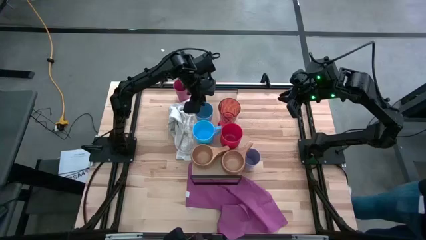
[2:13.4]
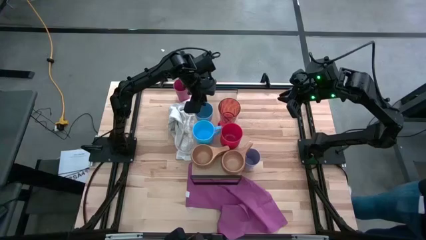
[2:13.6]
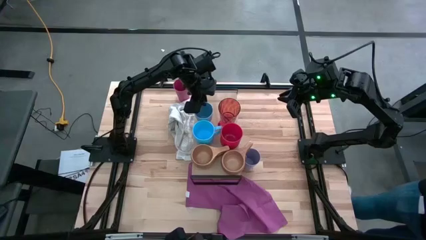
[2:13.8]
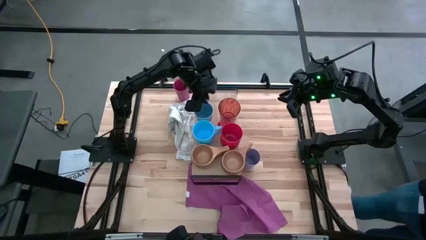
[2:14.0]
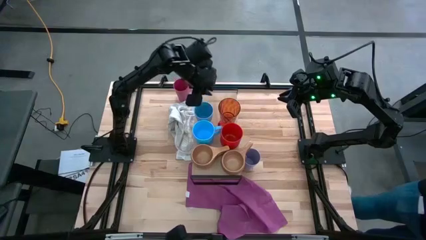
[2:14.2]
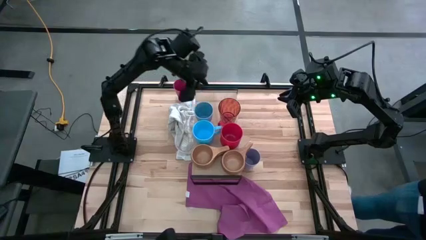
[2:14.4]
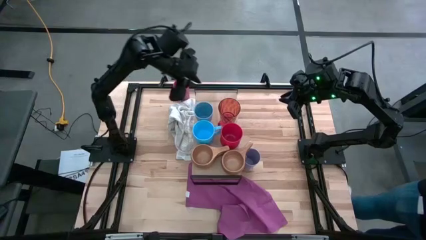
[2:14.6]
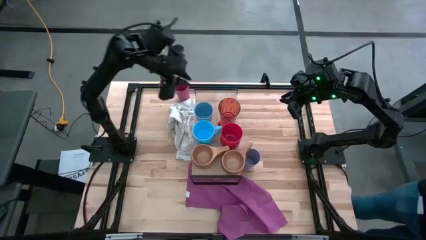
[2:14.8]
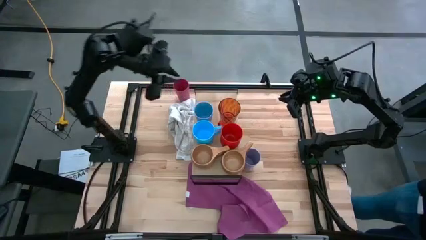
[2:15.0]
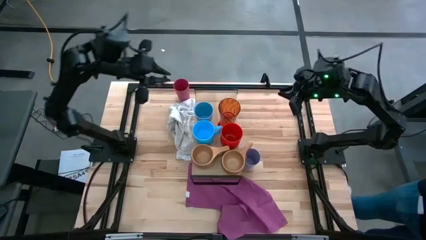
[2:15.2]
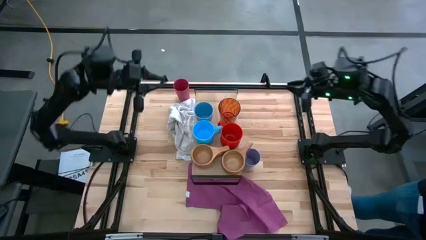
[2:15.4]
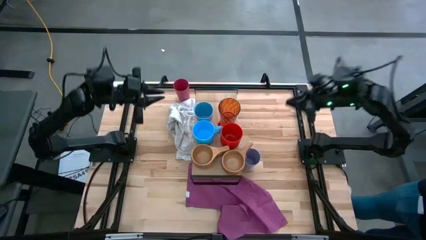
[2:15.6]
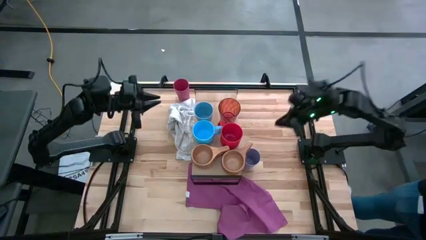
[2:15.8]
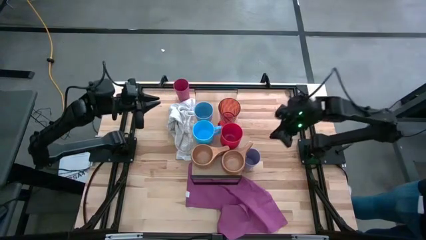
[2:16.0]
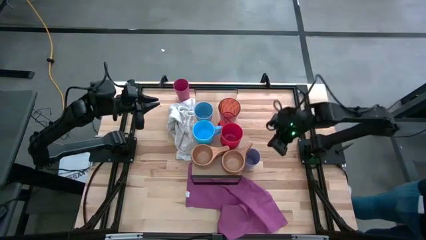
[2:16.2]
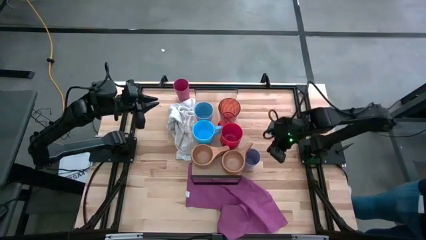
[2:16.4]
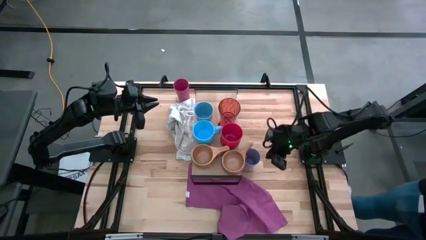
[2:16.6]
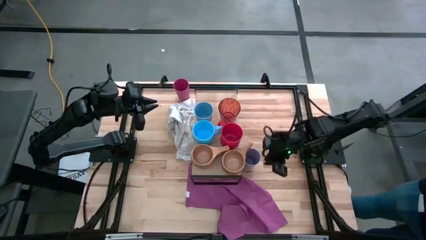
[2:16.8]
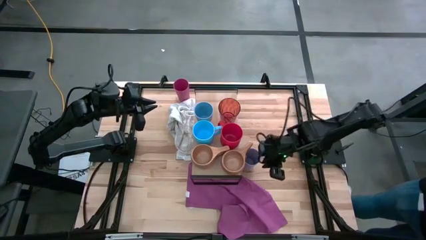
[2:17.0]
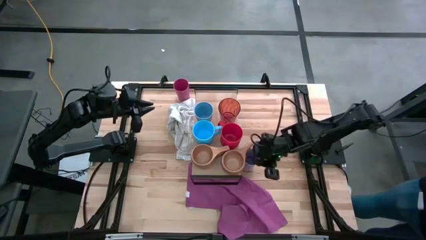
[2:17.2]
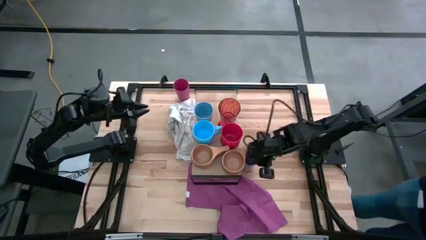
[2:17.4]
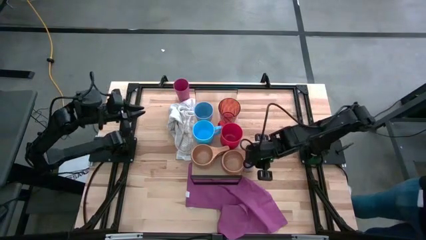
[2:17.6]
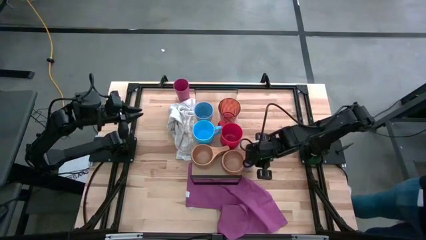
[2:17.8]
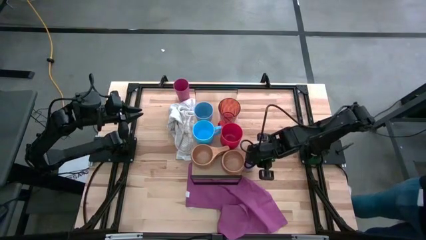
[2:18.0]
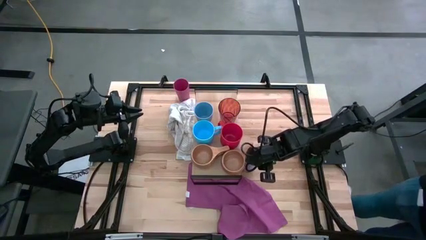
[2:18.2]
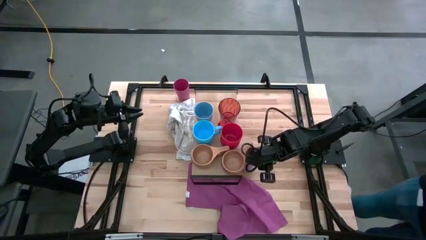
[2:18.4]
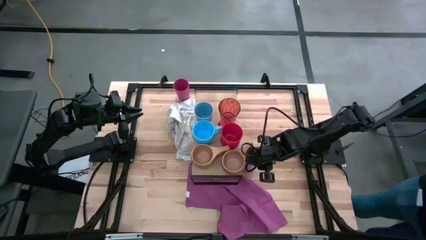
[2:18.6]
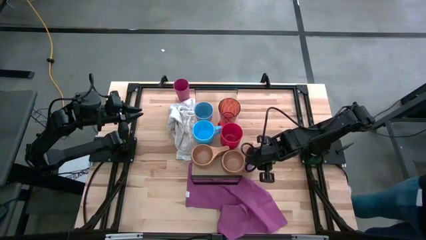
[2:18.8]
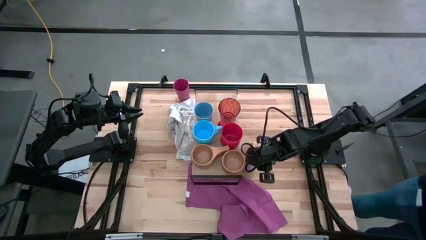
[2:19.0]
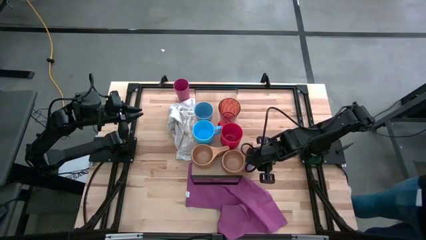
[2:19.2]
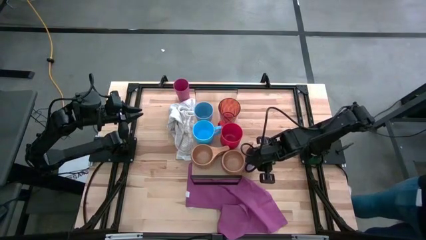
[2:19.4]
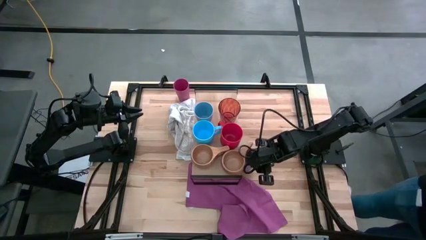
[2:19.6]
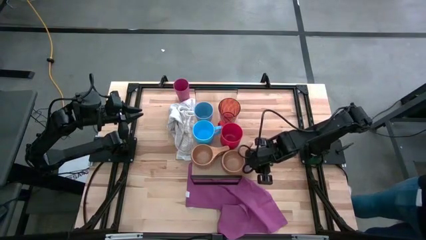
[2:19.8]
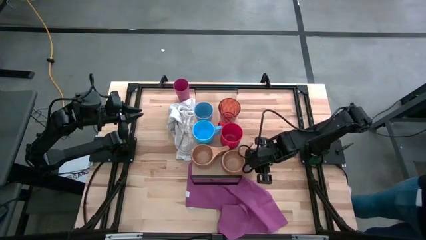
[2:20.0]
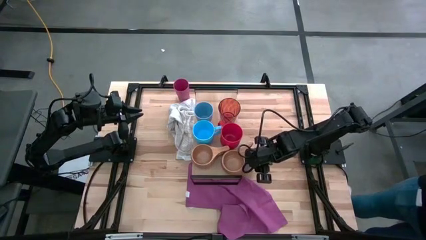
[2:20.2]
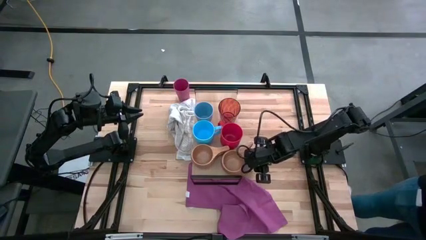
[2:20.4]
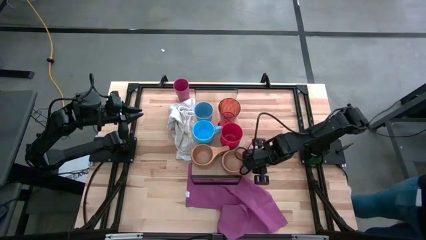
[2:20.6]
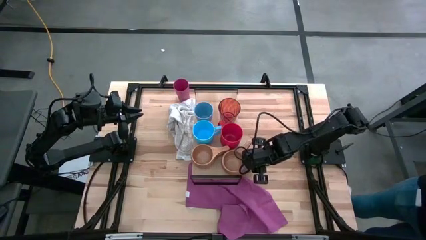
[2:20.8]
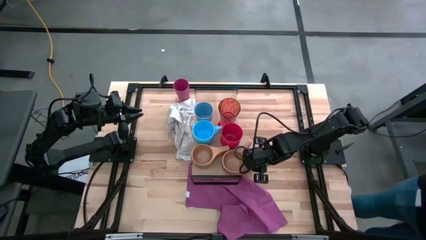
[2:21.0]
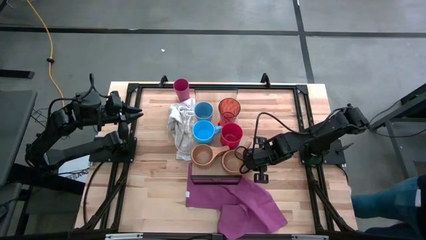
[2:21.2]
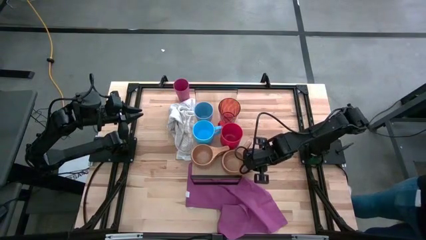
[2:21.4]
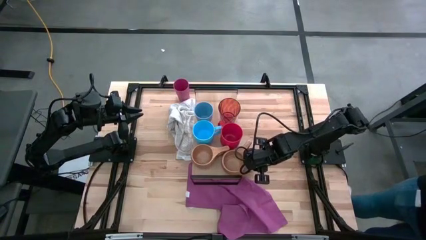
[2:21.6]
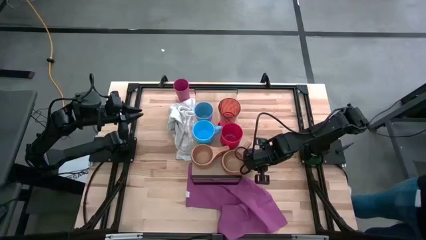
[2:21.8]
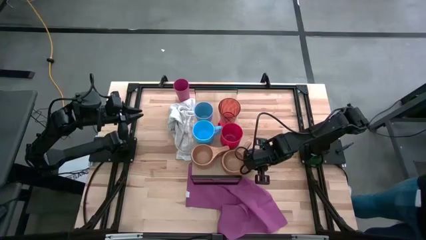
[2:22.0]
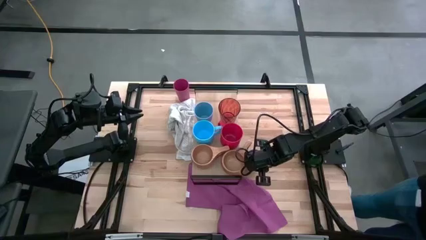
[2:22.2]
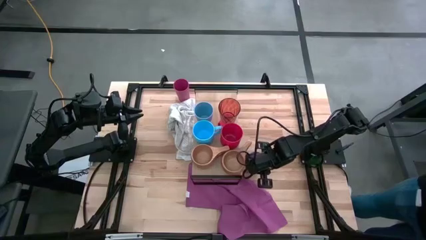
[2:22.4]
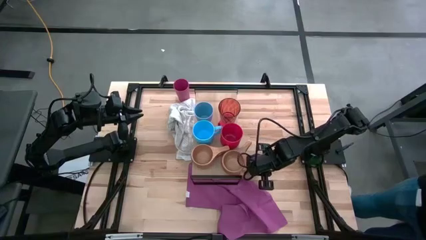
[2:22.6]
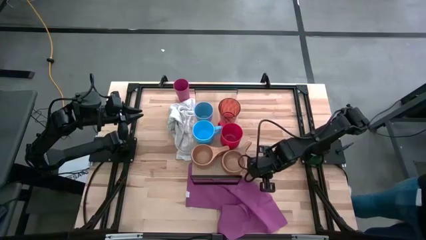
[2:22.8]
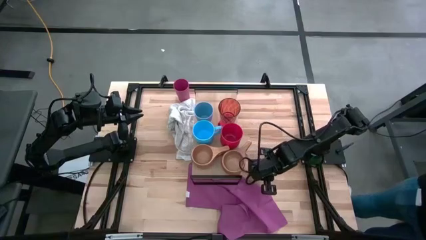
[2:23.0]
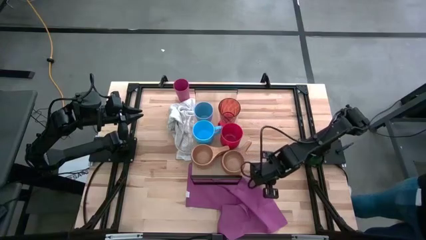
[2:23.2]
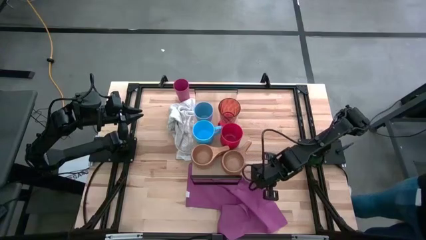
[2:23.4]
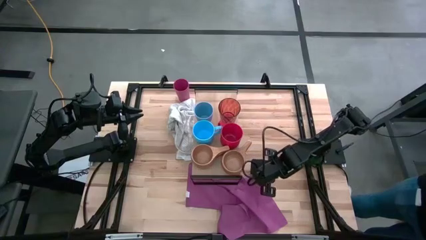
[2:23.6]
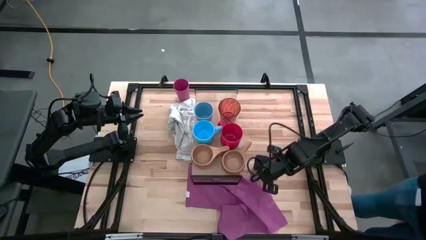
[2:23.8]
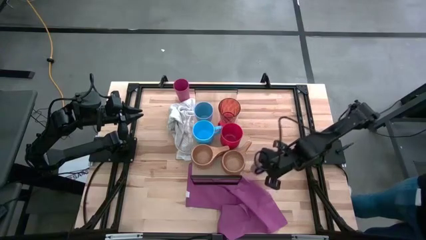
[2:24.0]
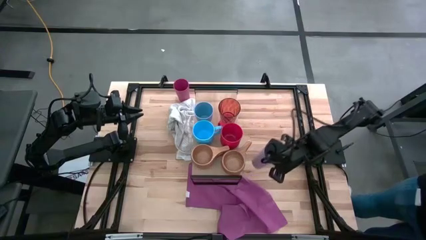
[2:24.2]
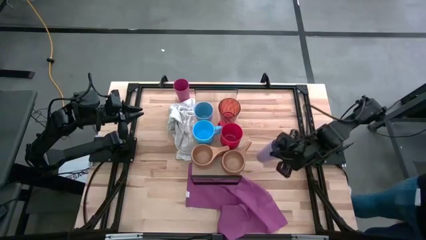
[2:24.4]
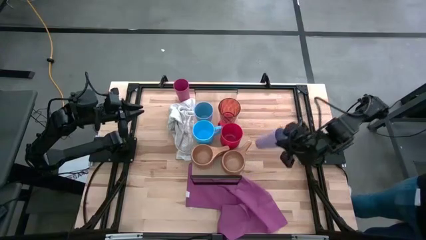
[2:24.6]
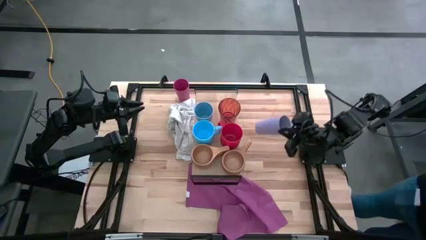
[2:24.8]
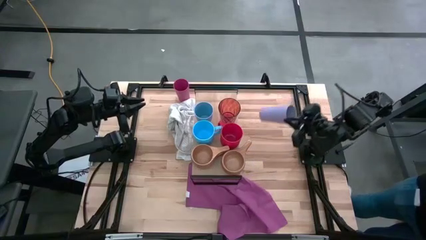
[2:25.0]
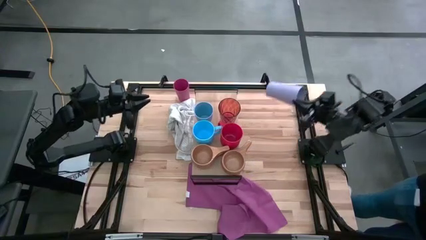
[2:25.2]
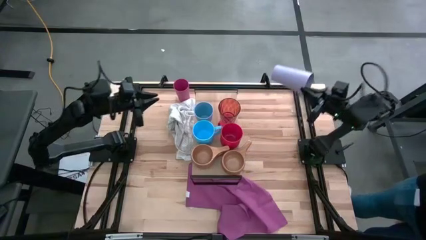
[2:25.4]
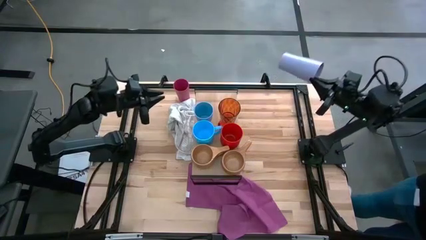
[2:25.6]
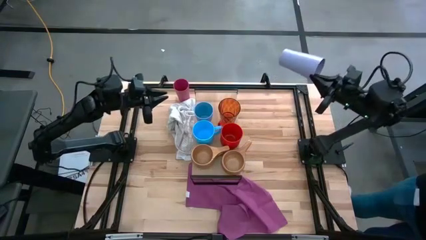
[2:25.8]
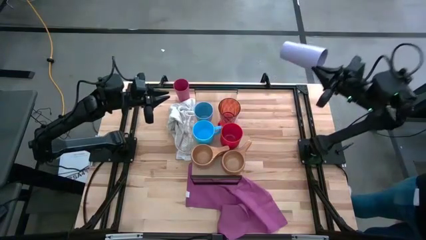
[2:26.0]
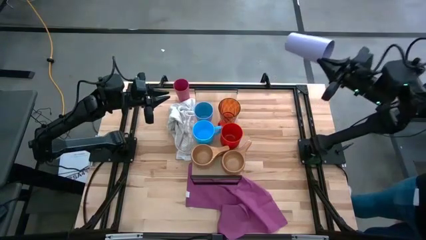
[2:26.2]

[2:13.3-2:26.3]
Task: Stack small to large cups/mugs on shelf
Put the purple cup on the shelf

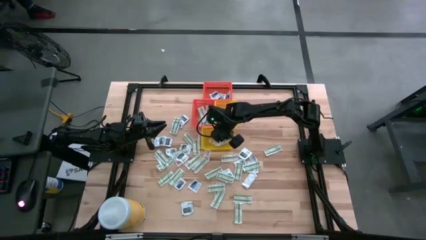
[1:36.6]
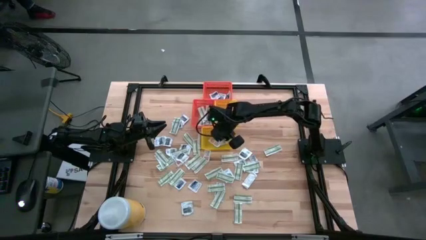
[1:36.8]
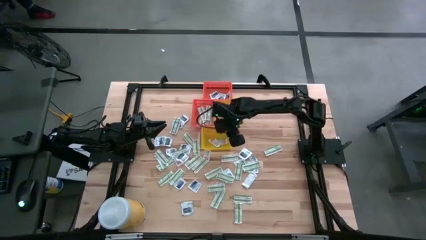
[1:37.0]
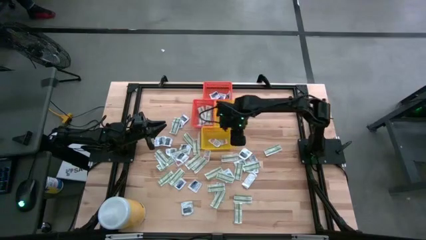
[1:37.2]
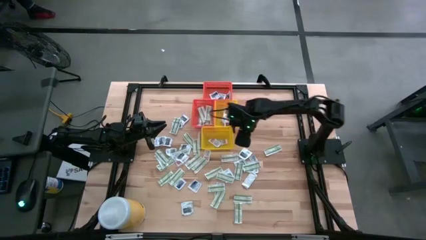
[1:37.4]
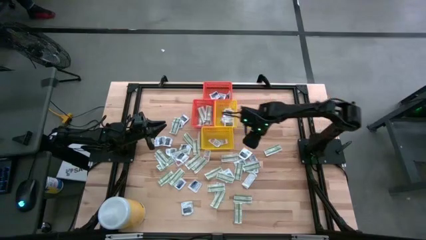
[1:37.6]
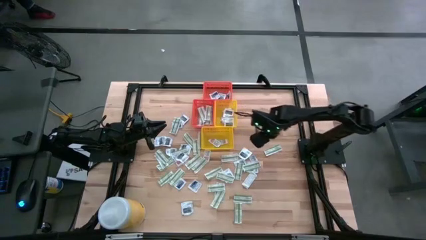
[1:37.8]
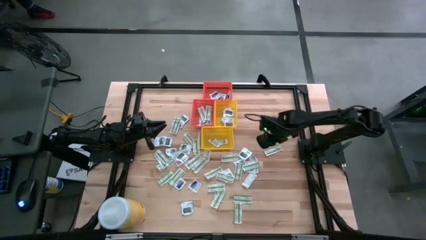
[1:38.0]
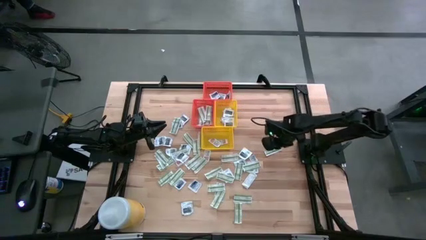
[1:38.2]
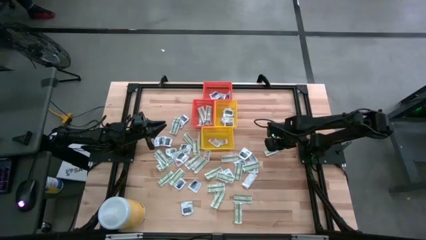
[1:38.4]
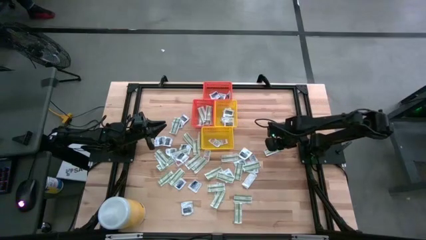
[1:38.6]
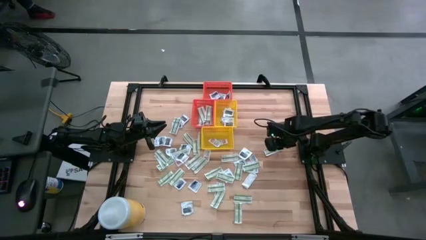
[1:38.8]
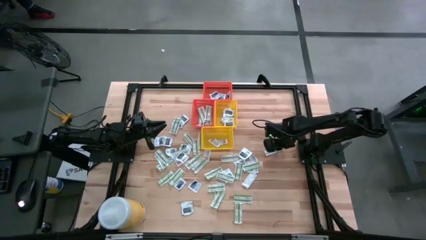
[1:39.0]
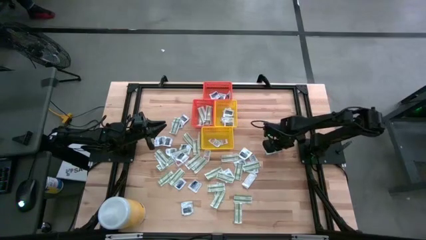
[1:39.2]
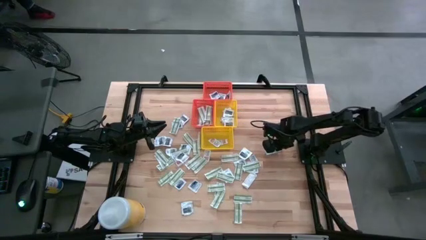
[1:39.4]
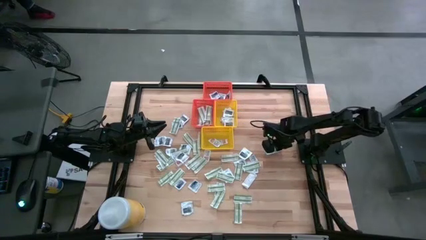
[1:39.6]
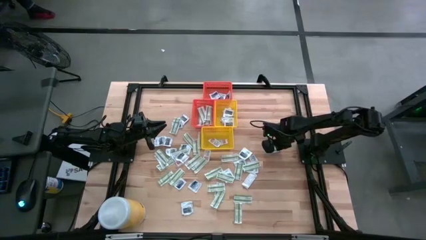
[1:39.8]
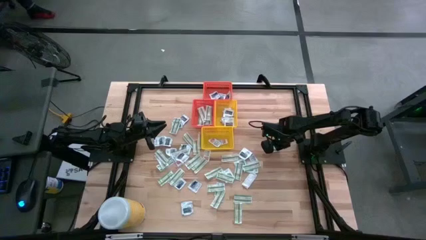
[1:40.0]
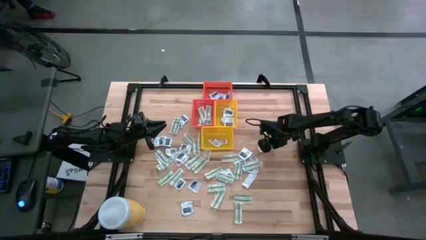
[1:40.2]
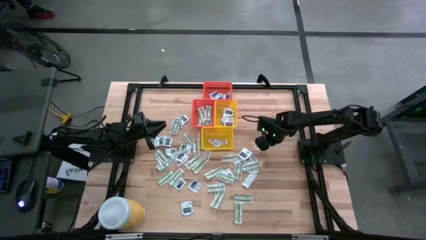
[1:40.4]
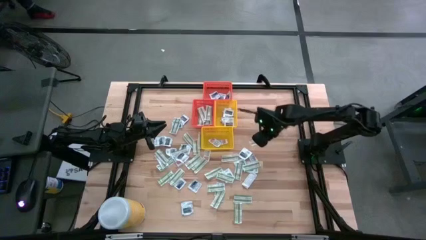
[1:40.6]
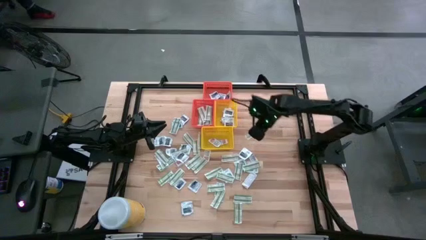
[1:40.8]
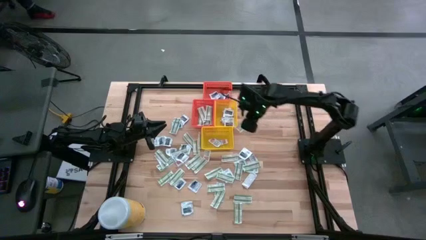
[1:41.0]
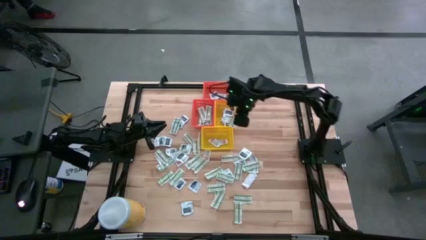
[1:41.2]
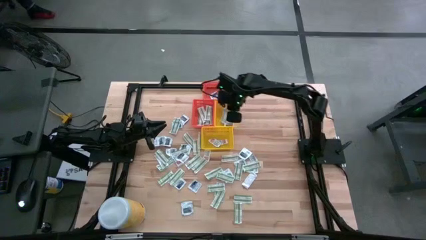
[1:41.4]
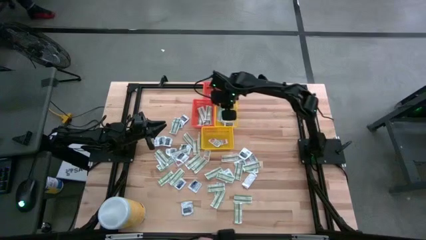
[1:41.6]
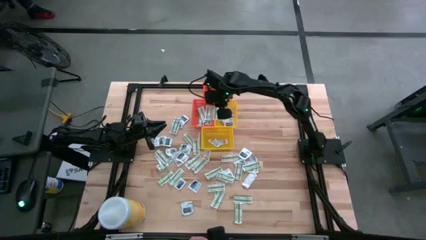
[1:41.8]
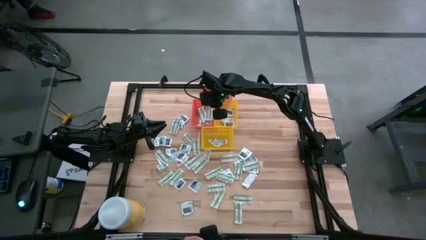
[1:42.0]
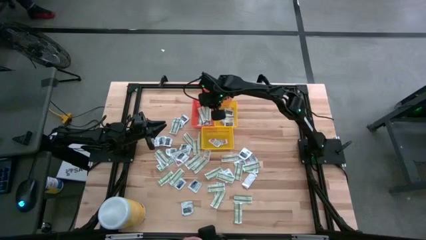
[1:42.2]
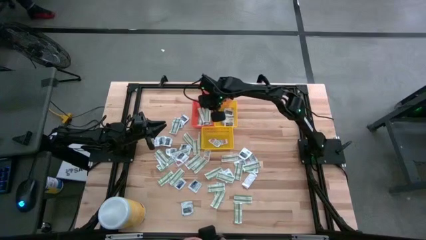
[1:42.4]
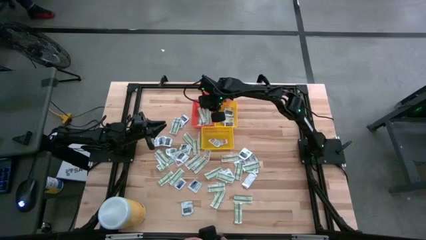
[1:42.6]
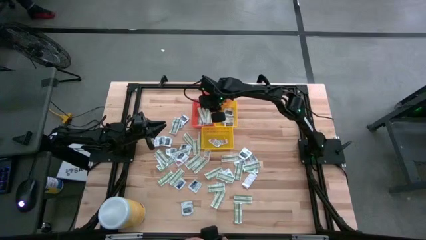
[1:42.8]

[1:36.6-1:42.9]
Task: Pick & Place First Aid Supplies
Put the bandage into the bottom orange bin
